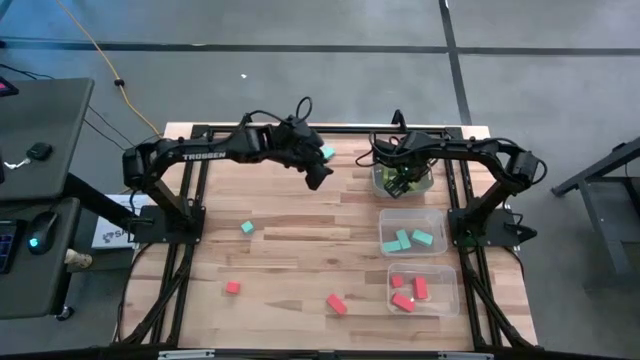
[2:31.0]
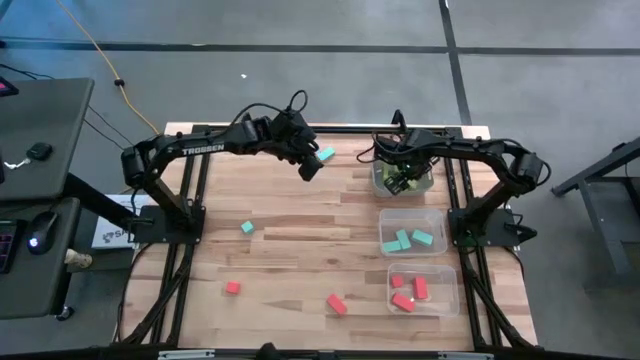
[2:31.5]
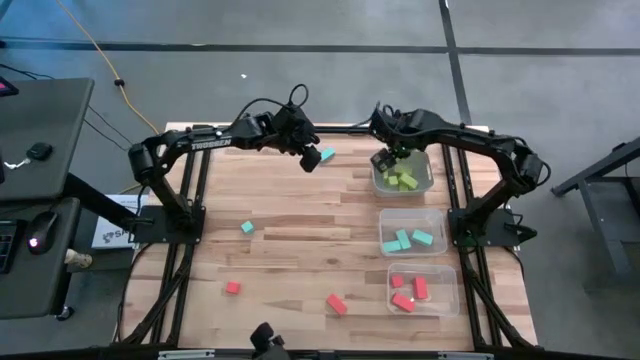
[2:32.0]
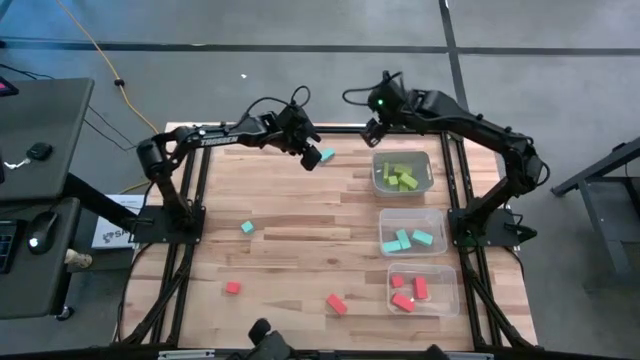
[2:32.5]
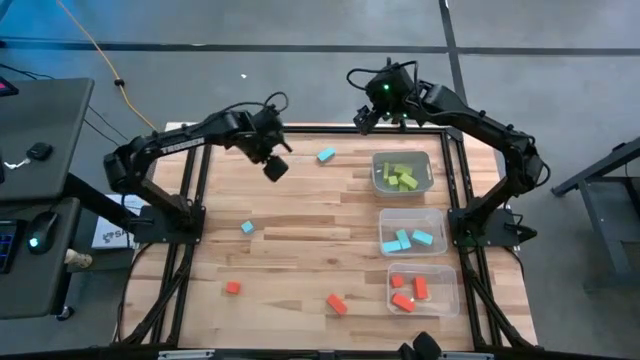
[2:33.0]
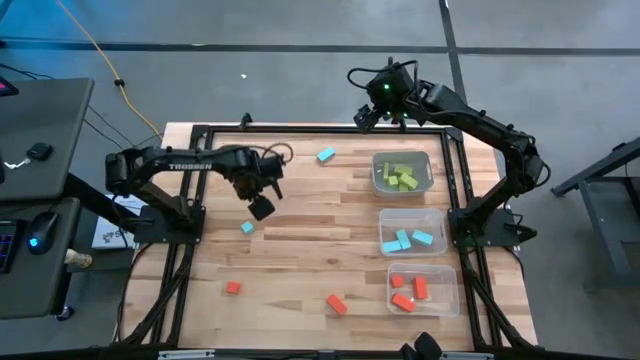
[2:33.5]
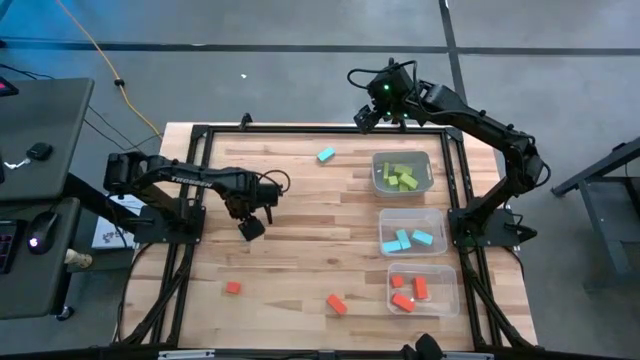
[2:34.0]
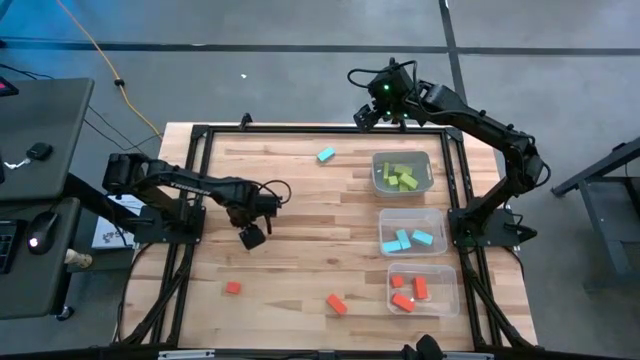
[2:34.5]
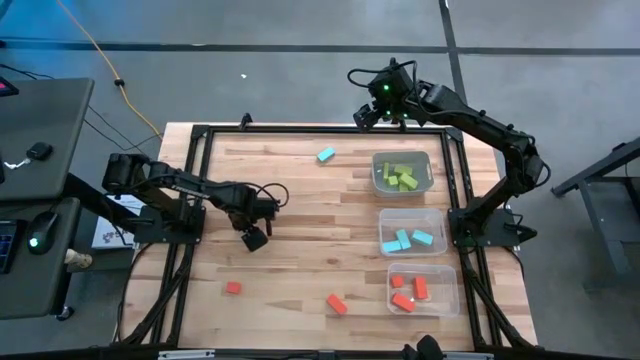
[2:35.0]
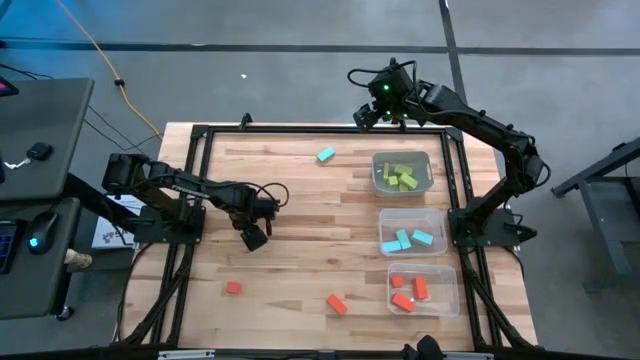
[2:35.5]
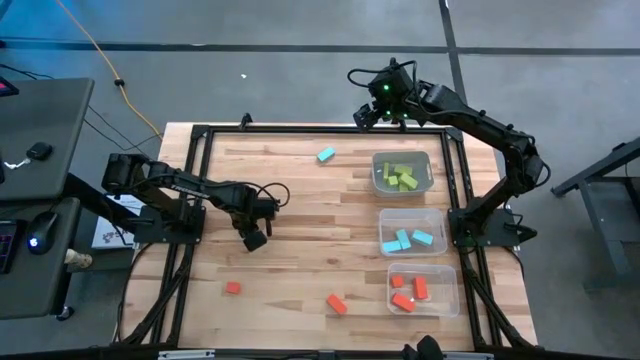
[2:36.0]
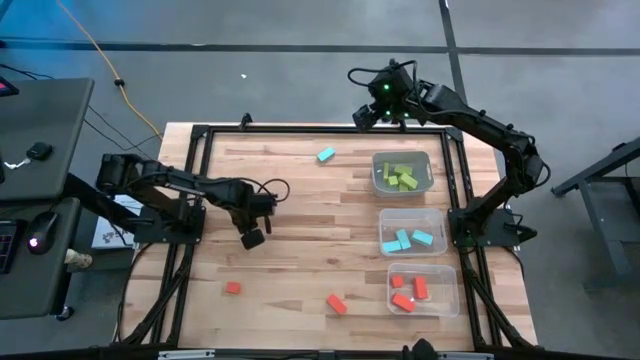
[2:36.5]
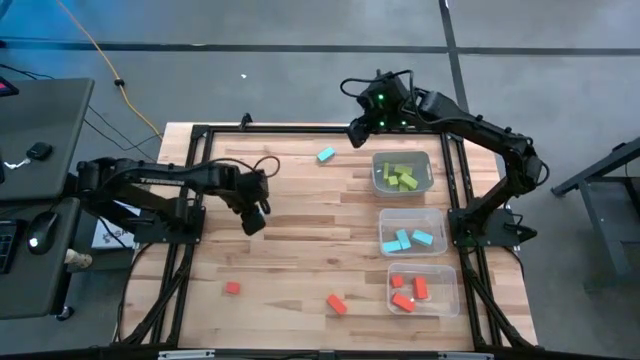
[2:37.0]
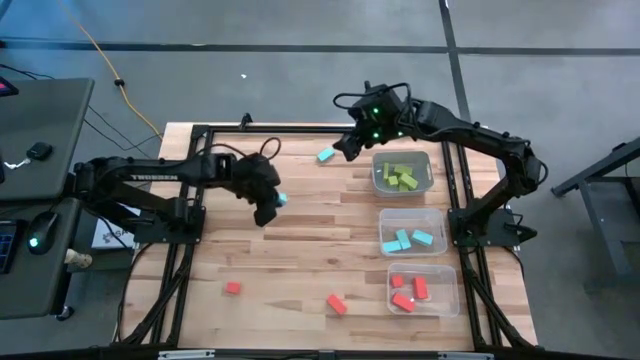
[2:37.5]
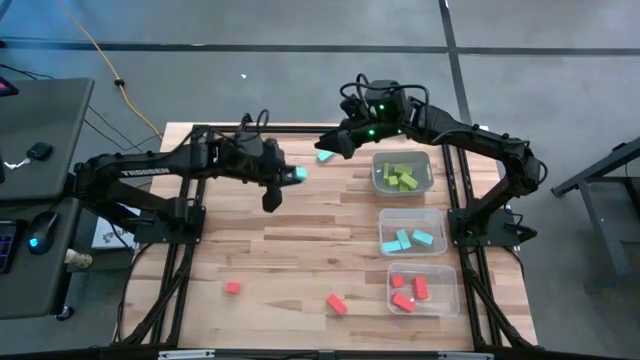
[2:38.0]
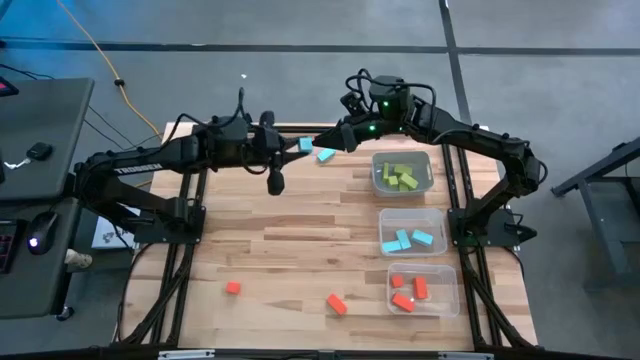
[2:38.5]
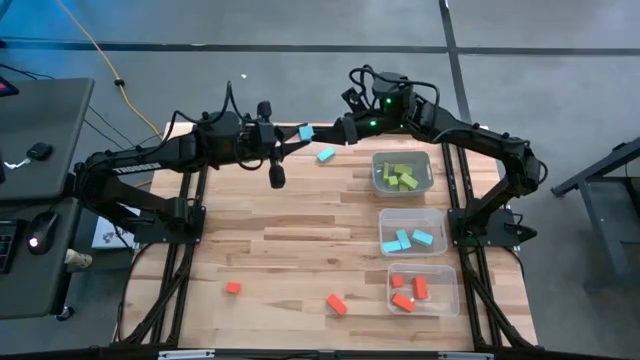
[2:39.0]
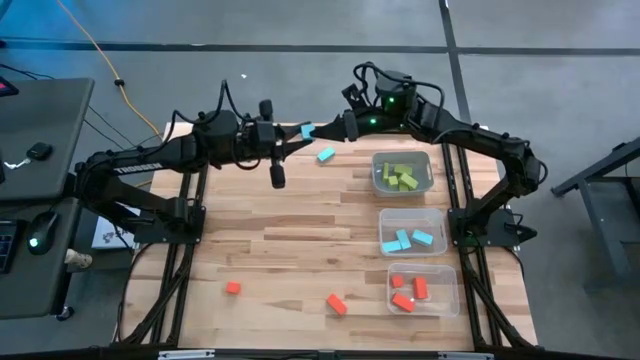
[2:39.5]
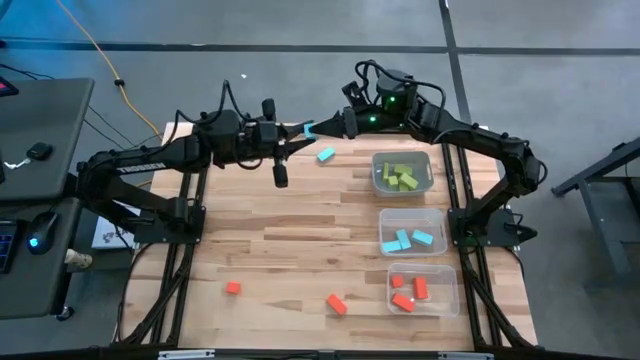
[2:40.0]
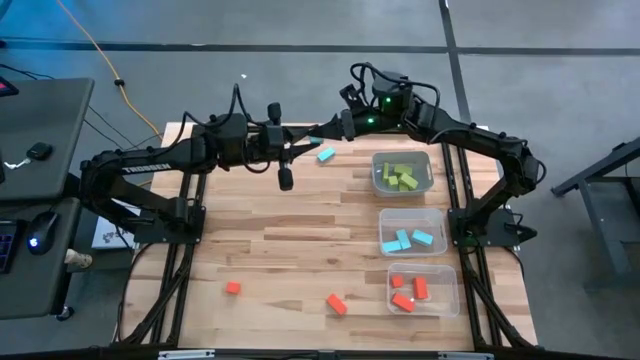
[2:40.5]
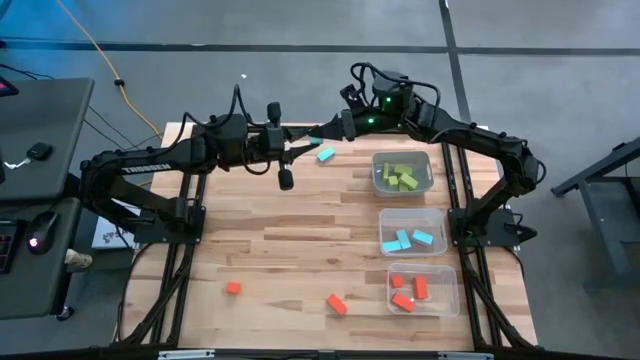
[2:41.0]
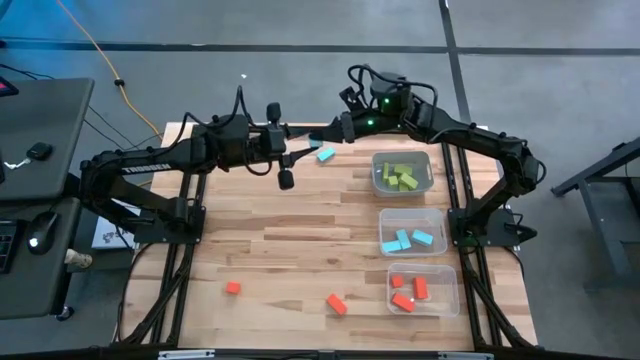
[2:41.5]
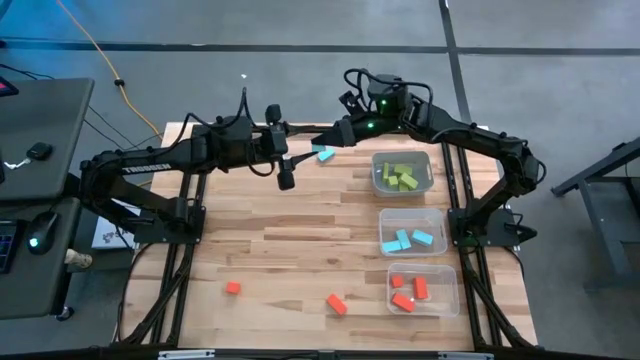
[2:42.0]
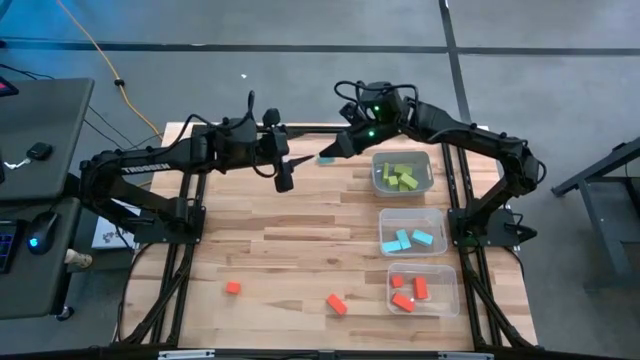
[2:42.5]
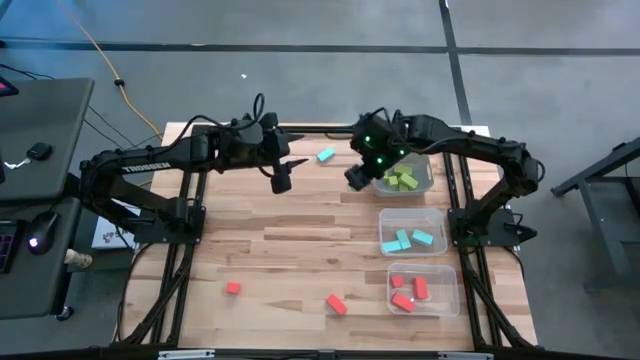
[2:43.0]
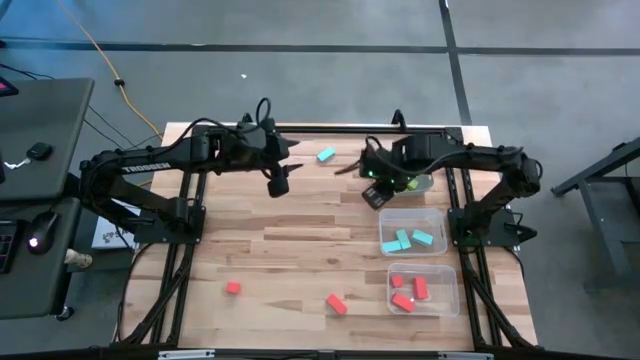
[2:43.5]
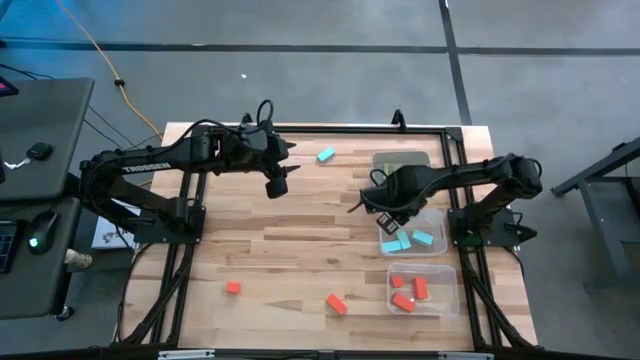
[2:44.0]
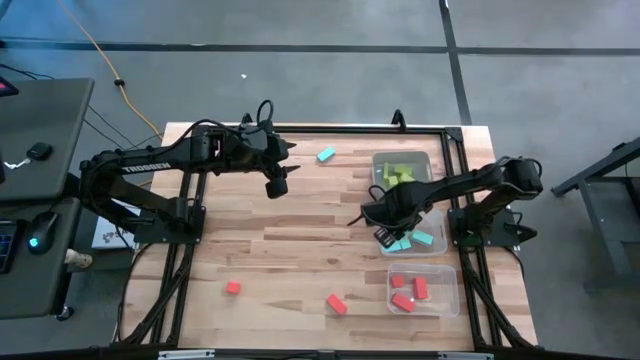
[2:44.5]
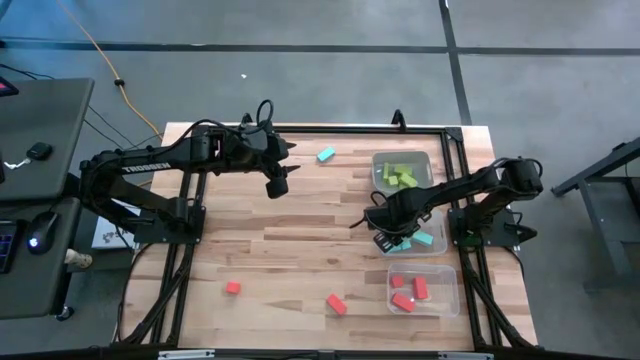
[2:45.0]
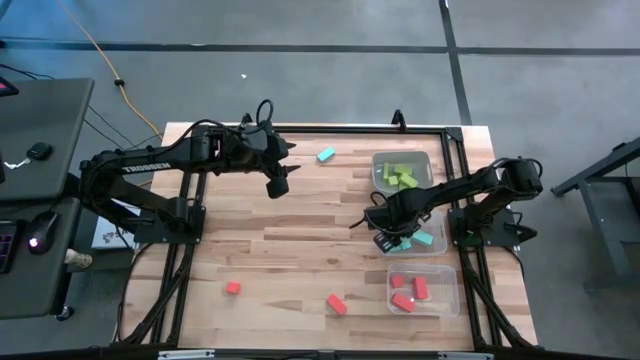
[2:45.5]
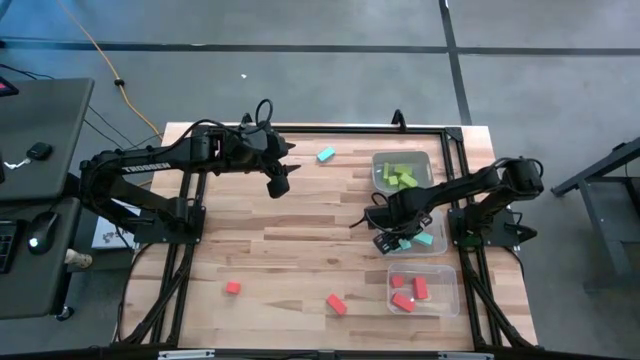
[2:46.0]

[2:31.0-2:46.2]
Task: Sort & place blocks by color
Put the light blue block into the top transparent bin

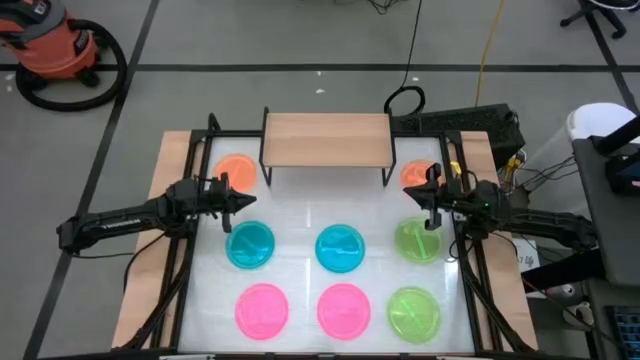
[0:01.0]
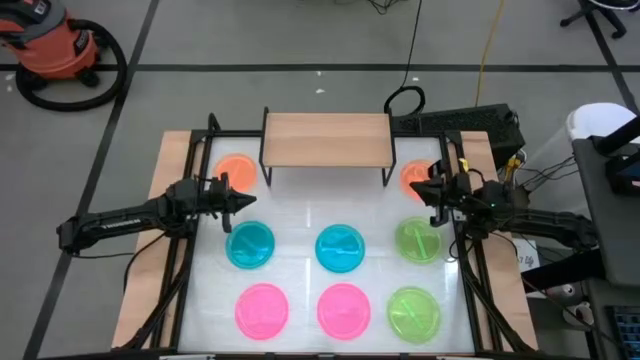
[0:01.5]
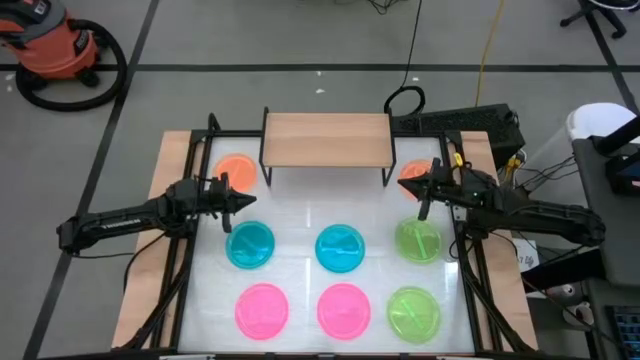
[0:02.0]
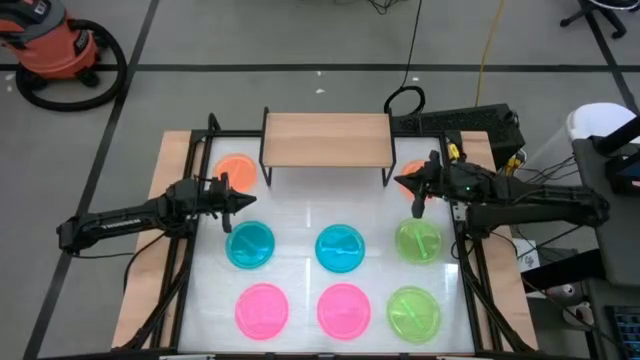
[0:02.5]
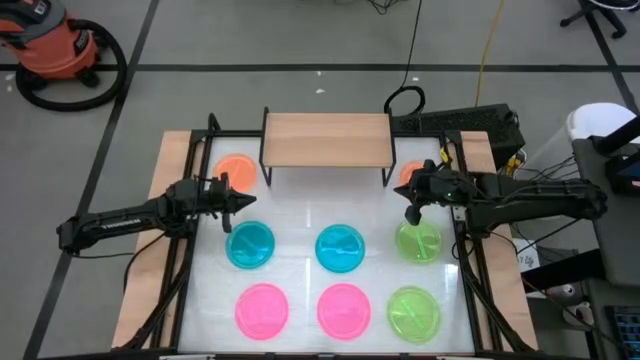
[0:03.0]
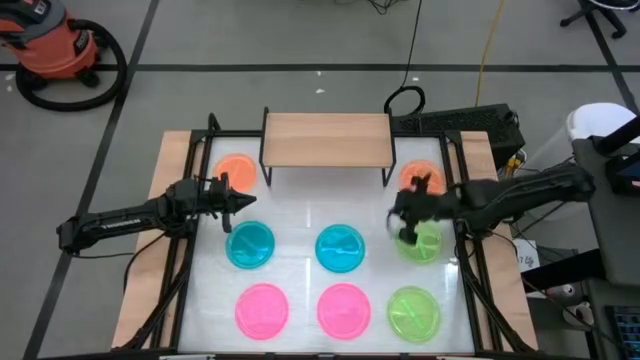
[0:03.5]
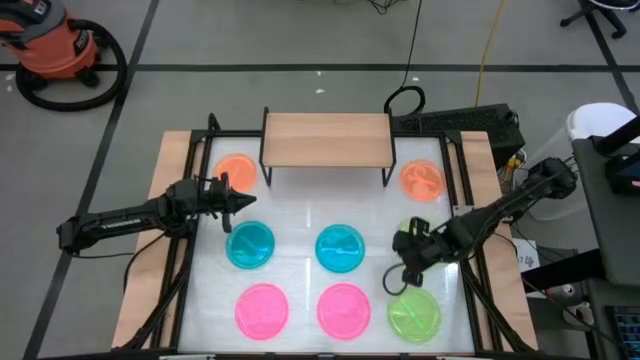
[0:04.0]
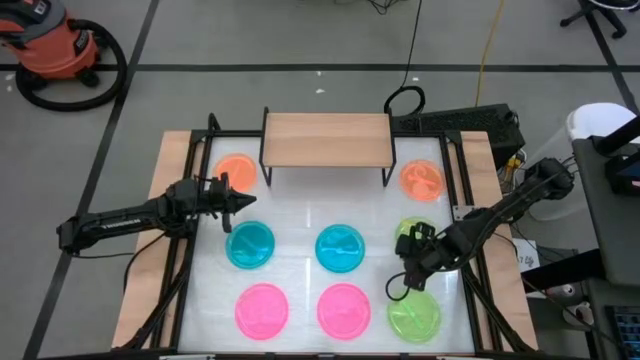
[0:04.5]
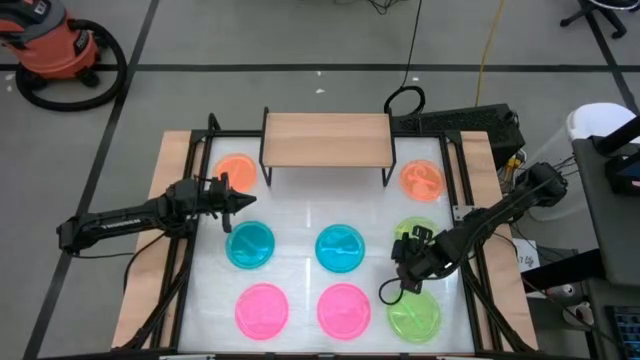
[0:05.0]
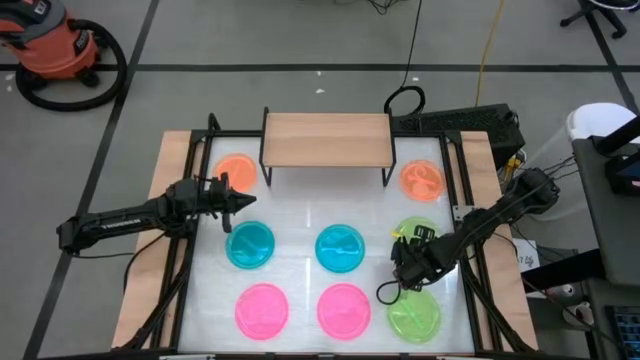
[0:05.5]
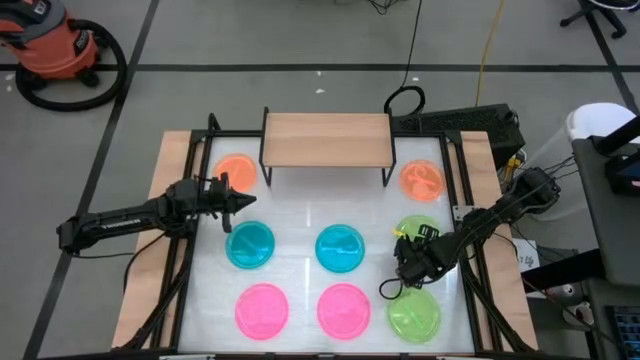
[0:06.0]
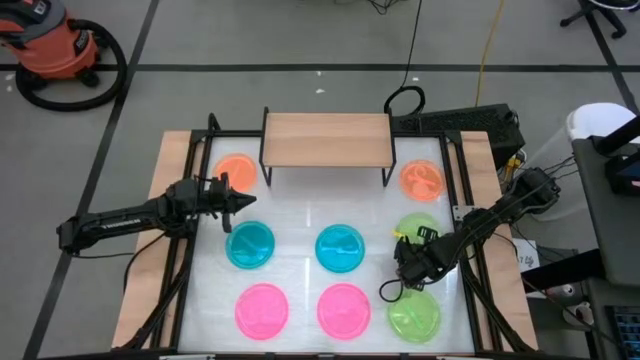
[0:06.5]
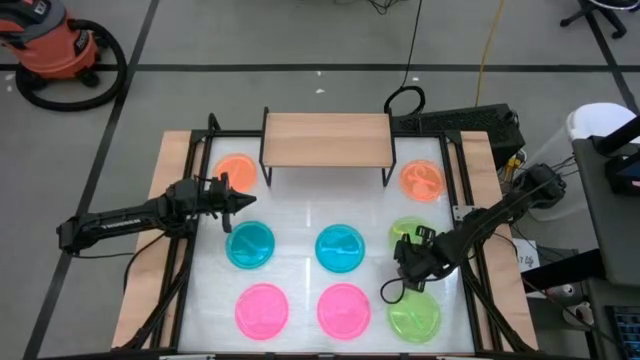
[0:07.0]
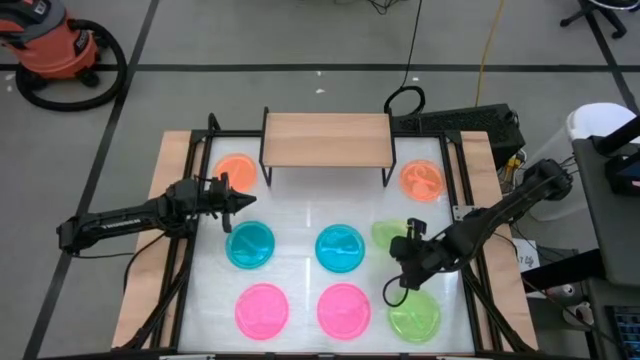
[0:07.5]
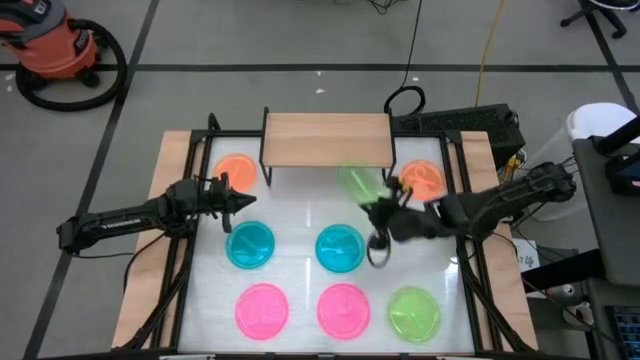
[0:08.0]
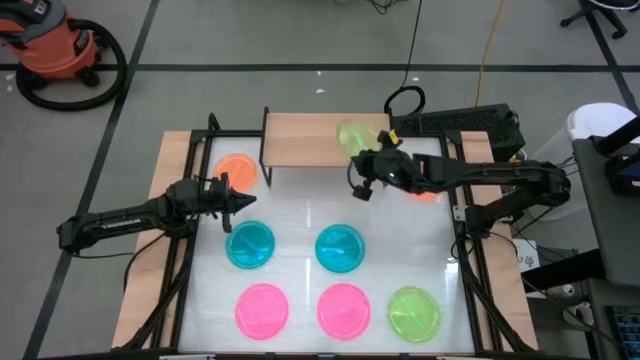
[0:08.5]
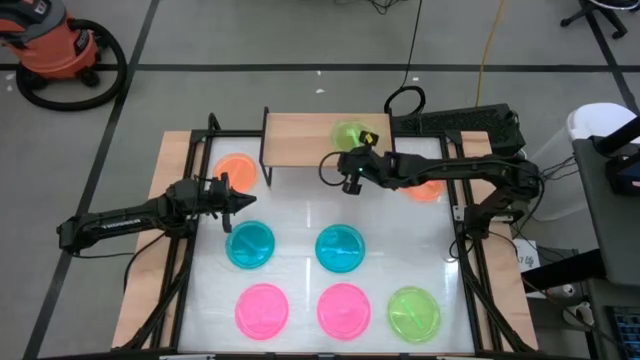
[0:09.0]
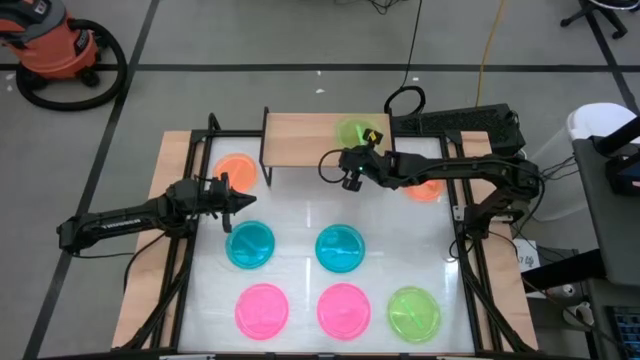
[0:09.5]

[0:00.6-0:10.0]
Task: Place and stack plates onto a shelf
Put the top green transparent plate on the shelf
